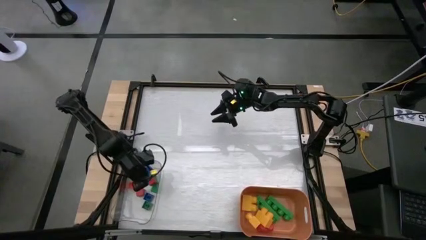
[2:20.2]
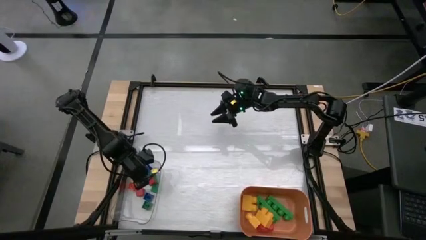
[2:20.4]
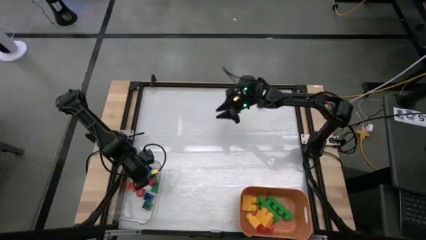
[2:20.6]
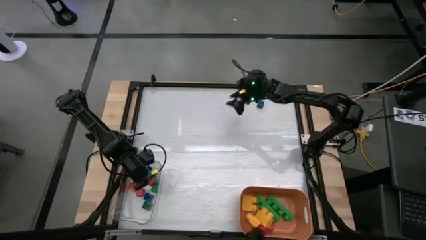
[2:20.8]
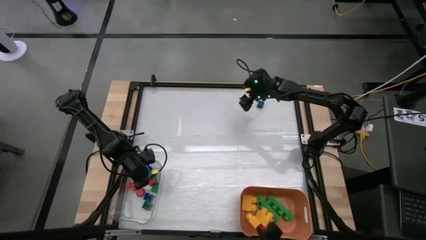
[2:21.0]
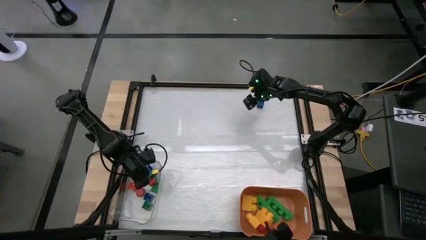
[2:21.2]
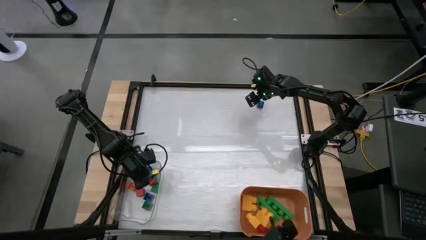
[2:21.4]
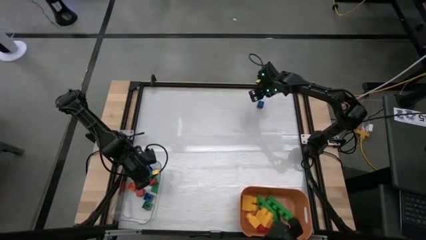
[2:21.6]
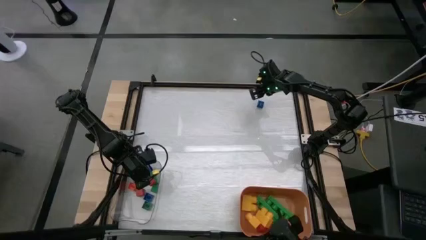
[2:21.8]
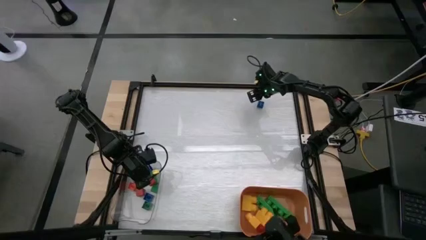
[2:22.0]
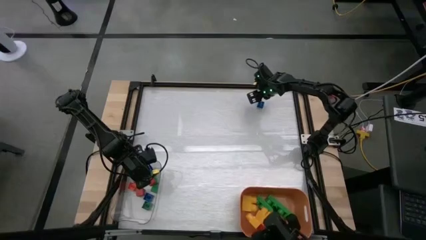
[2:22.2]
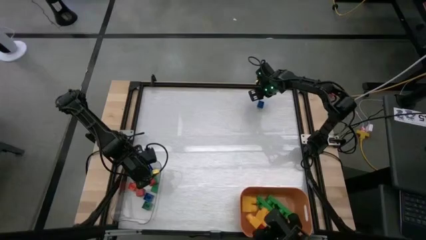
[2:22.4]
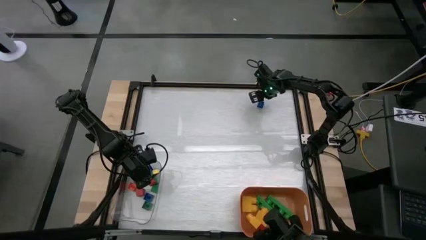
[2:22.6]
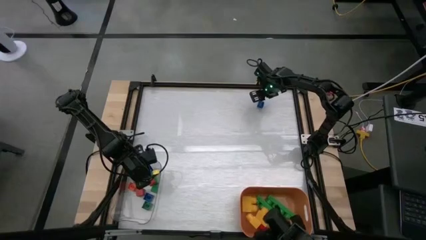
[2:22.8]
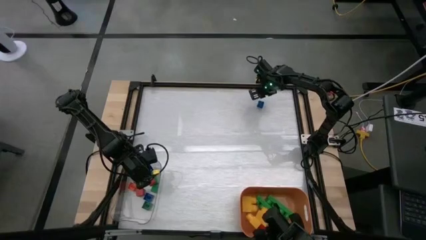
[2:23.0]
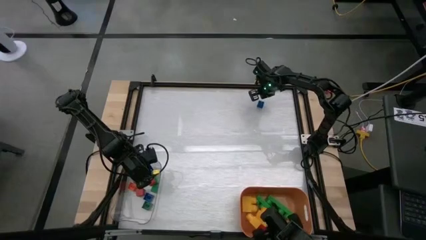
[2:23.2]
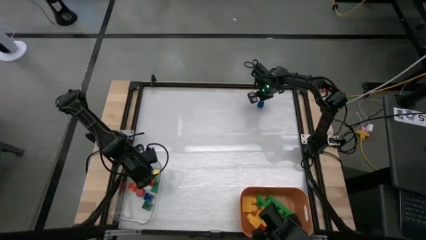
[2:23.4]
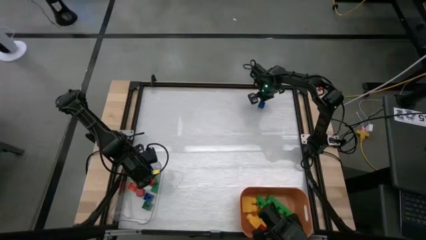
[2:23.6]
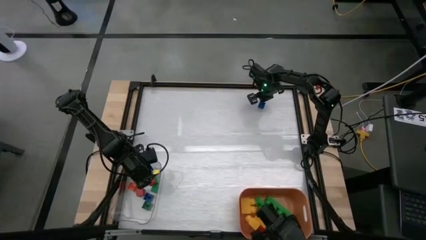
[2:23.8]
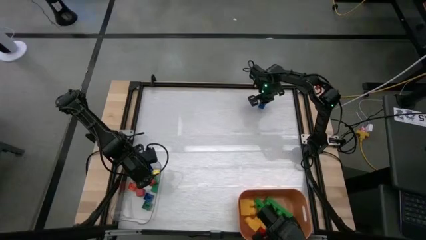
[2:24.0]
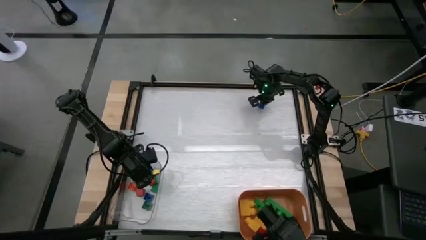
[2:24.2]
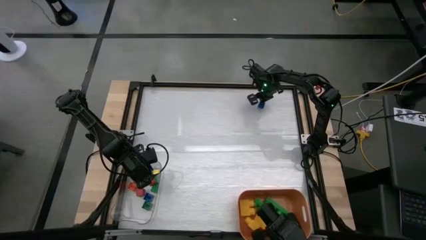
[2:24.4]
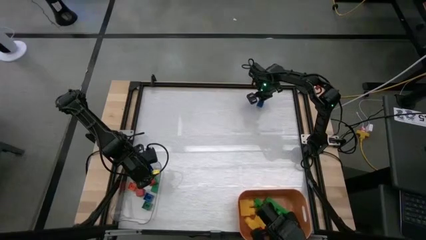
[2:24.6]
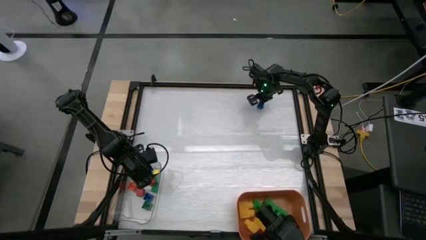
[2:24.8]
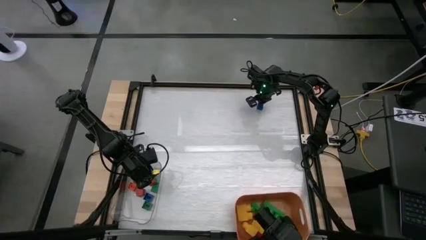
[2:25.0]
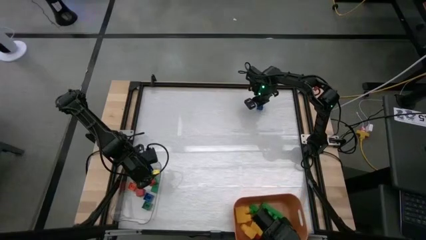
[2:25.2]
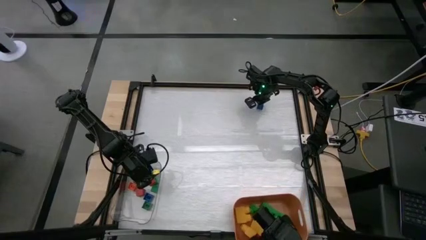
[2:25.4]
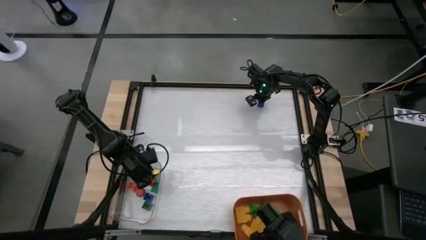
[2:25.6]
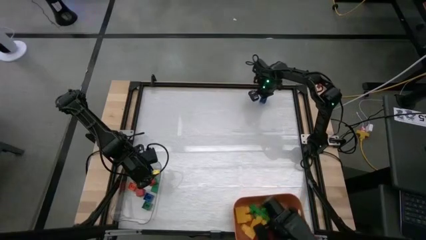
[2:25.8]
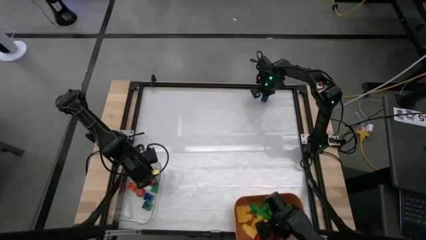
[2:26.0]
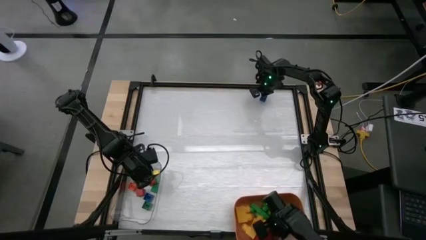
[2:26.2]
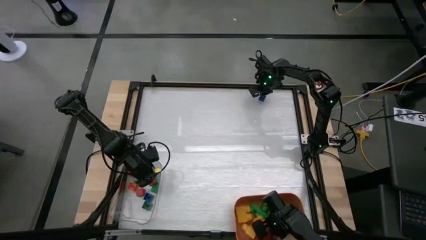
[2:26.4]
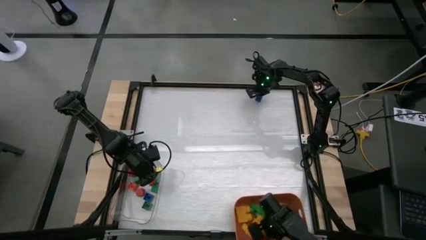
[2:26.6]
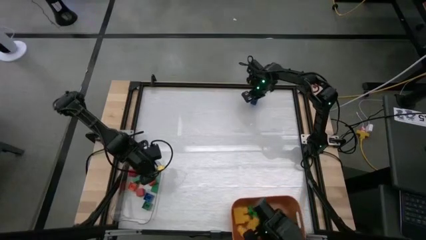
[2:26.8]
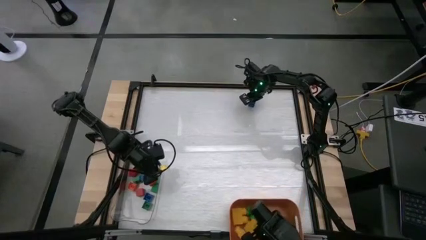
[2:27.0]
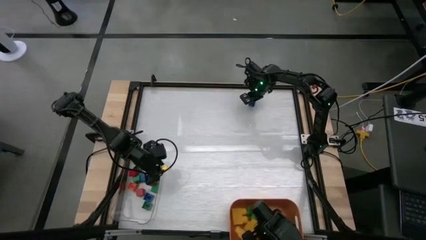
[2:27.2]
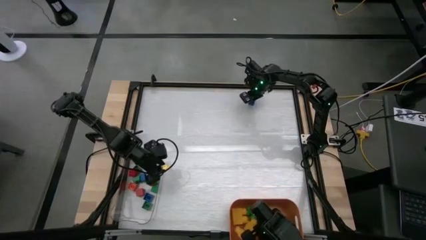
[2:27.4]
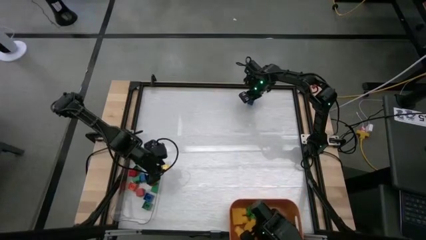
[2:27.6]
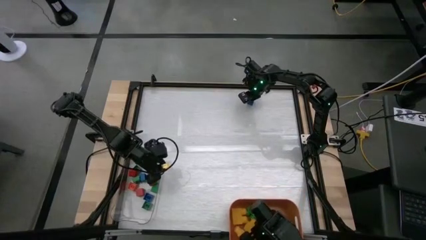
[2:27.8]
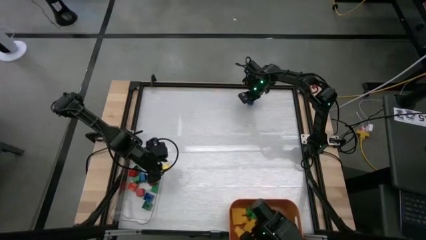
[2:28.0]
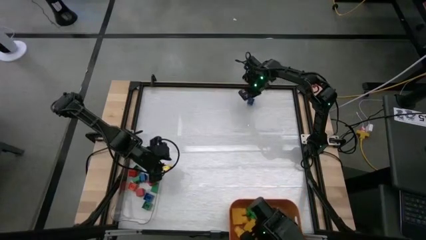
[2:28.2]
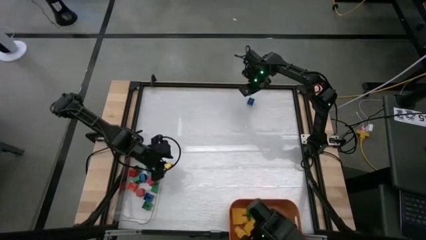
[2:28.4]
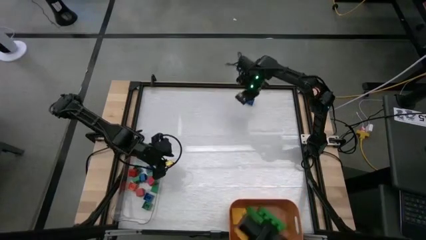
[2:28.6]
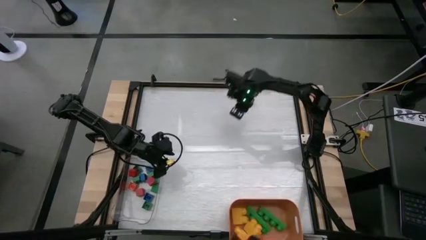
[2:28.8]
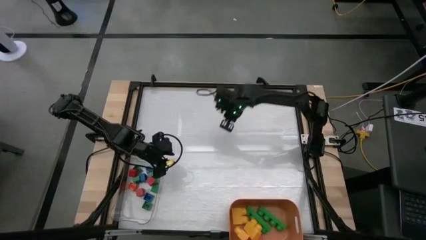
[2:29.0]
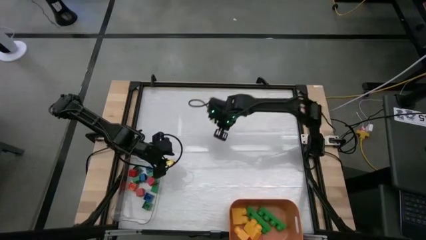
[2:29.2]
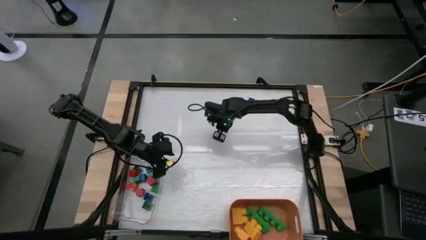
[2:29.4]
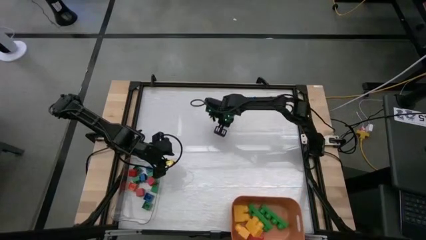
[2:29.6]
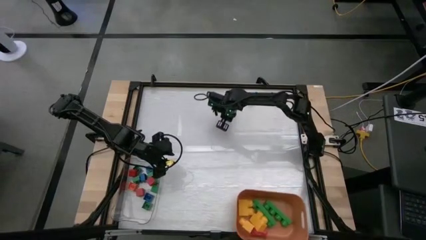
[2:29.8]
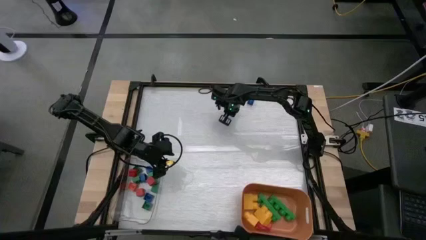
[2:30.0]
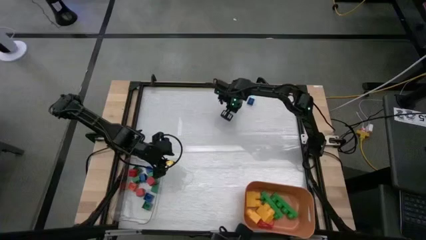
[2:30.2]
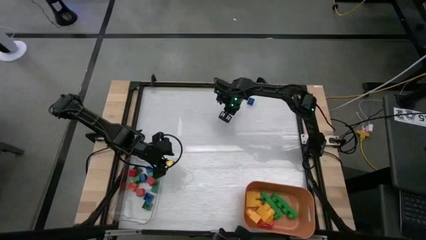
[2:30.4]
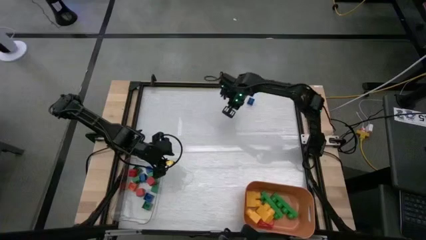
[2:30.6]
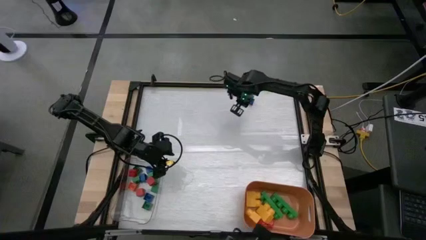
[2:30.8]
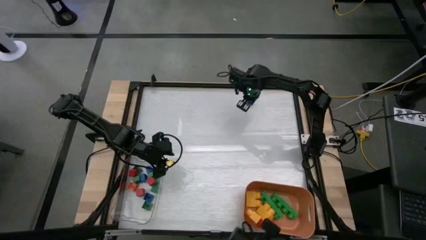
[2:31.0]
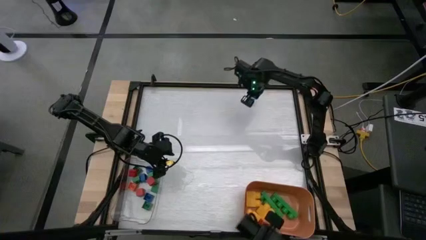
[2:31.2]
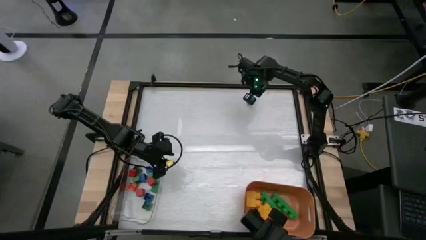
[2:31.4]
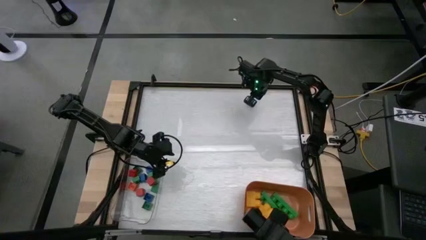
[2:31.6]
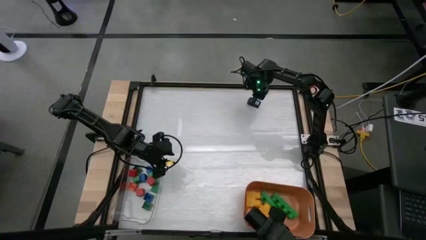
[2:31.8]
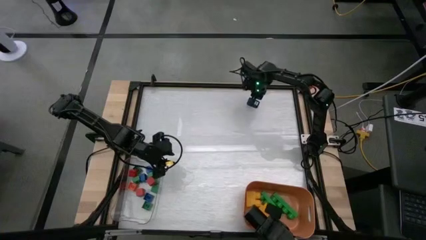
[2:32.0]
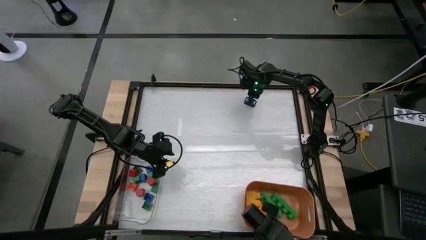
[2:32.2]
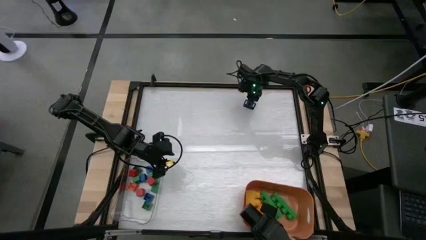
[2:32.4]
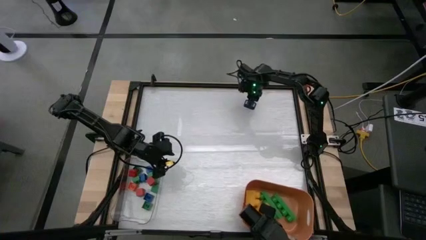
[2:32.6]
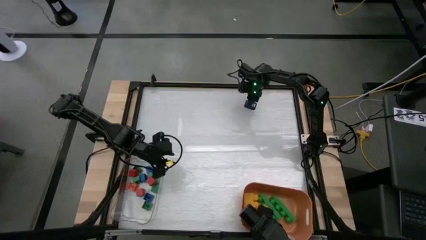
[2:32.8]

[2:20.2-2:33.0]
Task: Sort blocks by size
Put the small blue game piece into the transparent bin

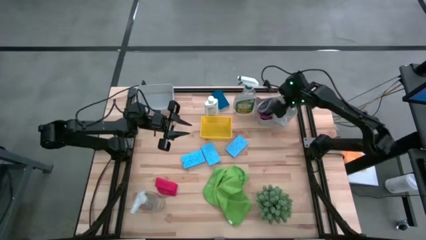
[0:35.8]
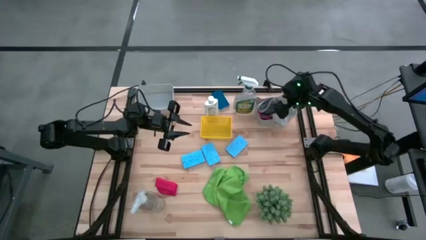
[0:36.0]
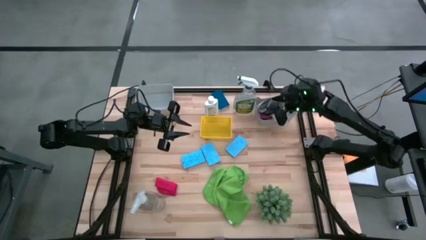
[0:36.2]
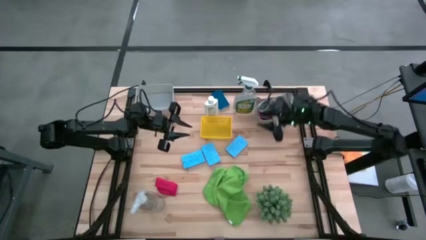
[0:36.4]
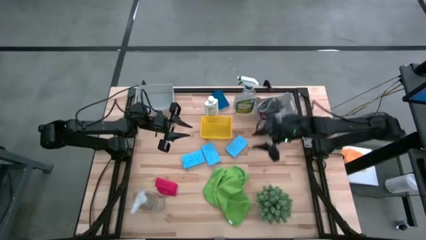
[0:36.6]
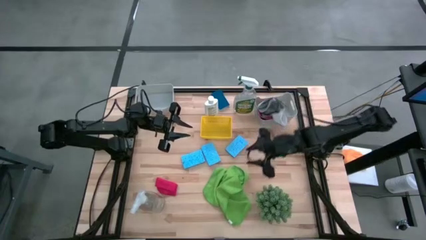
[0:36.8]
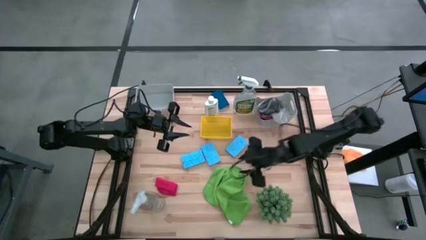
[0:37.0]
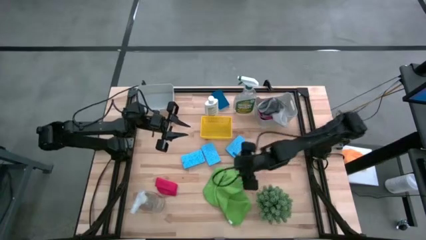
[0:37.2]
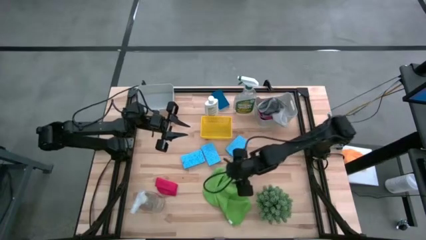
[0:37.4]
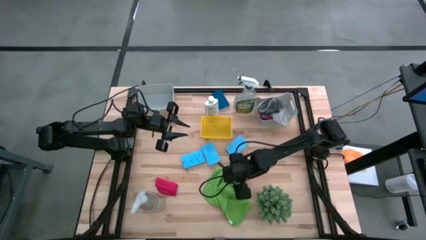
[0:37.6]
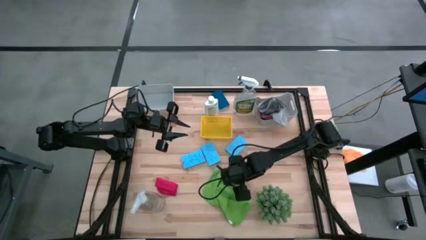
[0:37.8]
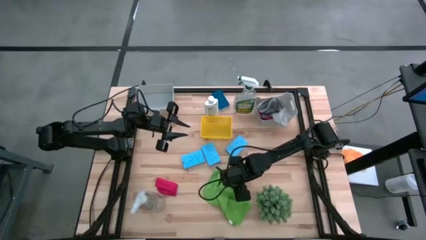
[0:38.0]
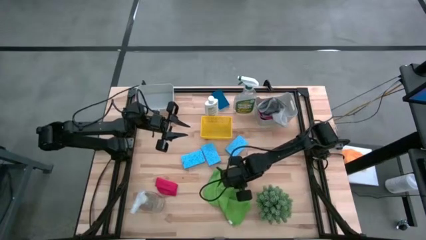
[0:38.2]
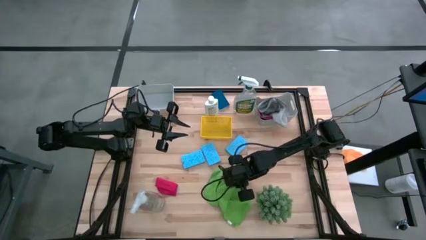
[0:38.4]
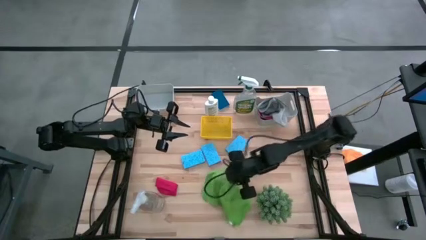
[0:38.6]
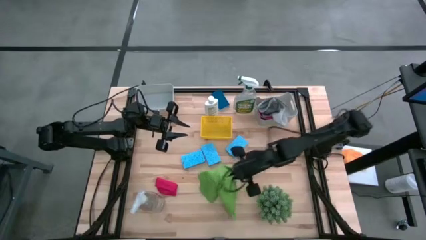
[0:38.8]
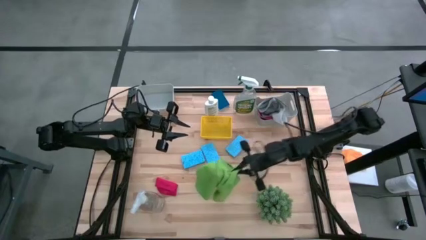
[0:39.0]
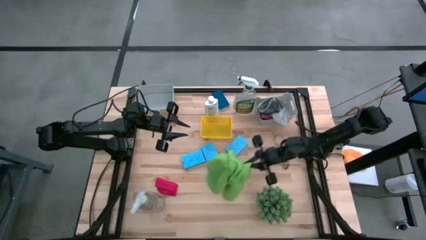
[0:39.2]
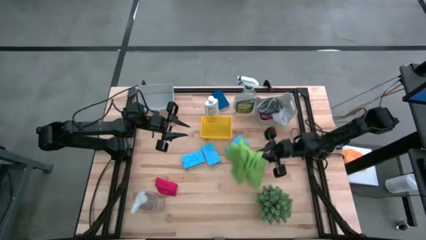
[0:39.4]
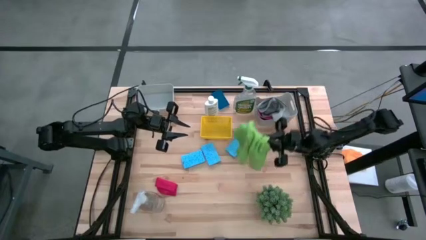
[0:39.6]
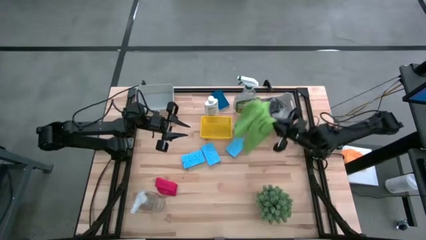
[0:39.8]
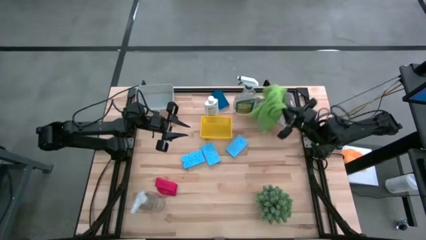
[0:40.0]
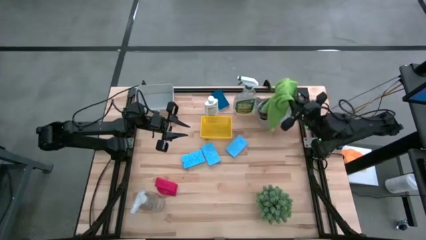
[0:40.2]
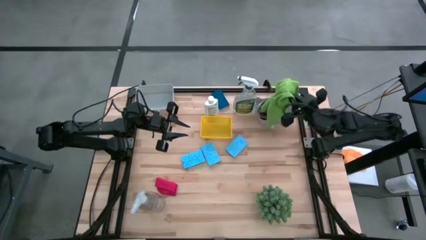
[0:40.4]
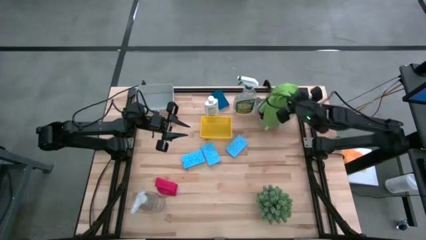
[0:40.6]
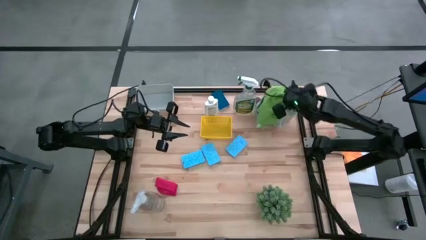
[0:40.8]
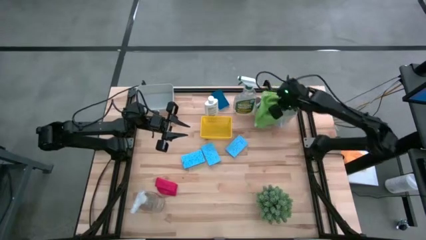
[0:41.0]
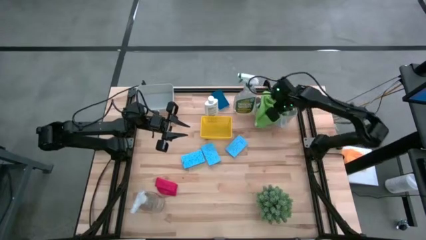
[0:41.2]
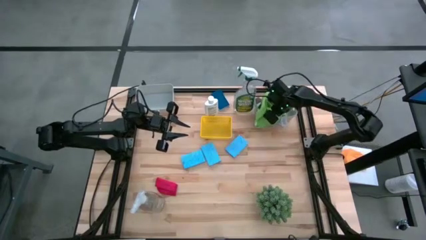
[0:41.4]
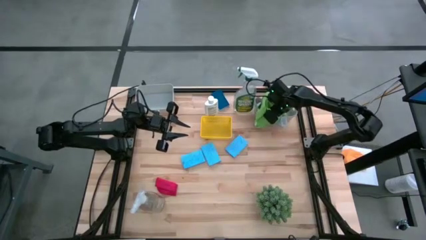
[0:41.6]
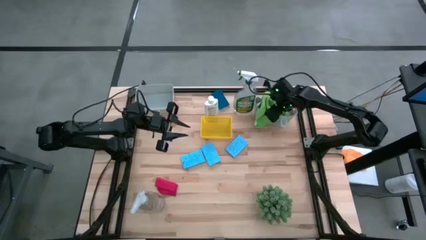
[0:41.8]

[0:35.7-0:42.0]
Task: Pick & Place Kitchen Items
Put the green microfiber towel into the right gray bin
